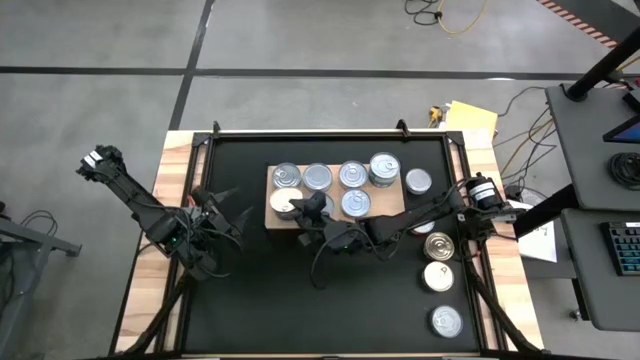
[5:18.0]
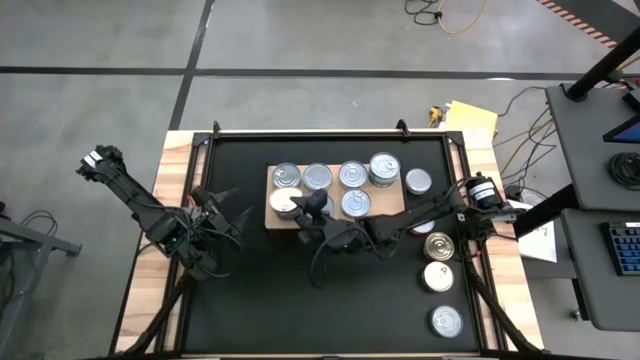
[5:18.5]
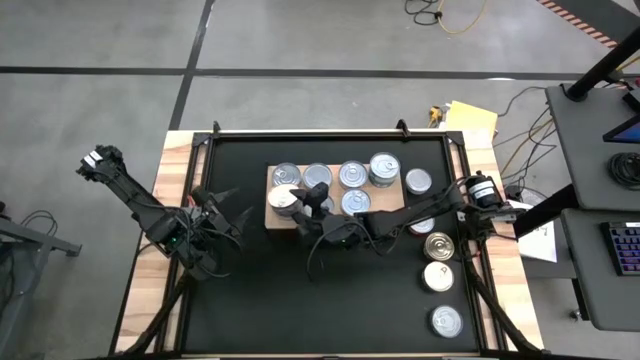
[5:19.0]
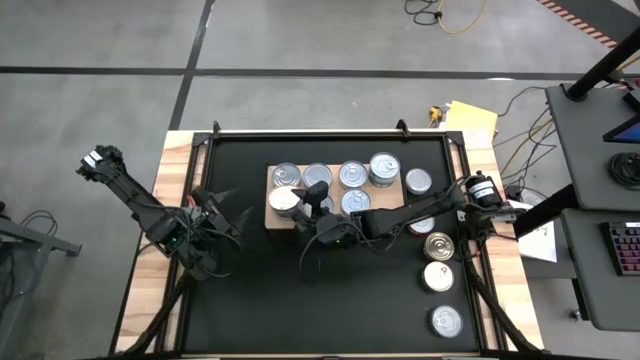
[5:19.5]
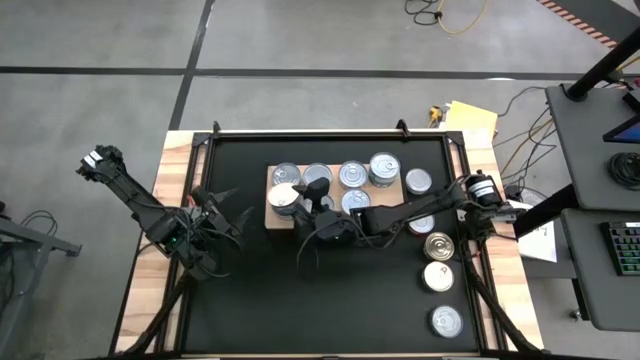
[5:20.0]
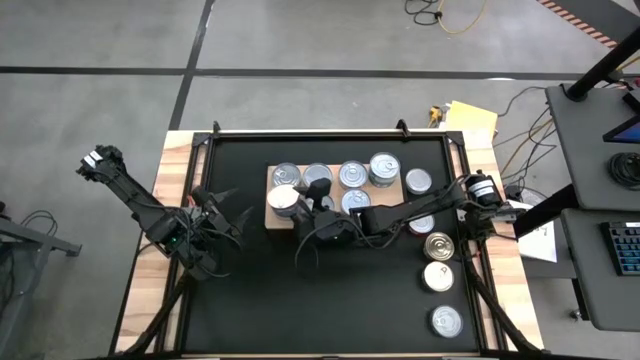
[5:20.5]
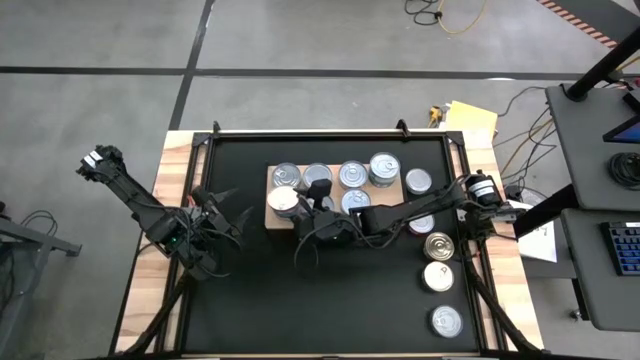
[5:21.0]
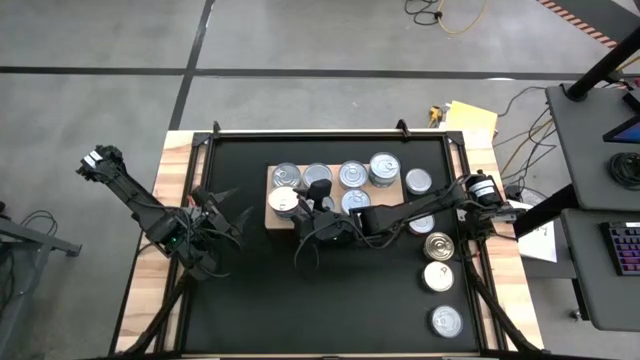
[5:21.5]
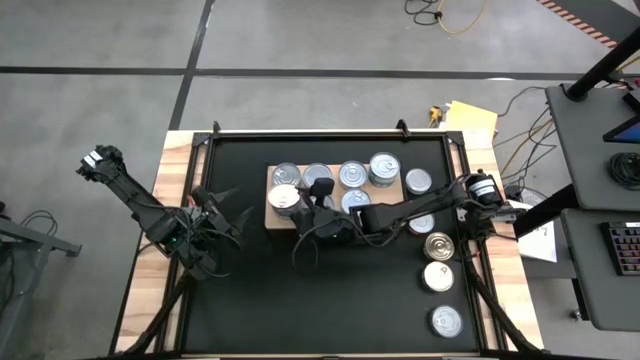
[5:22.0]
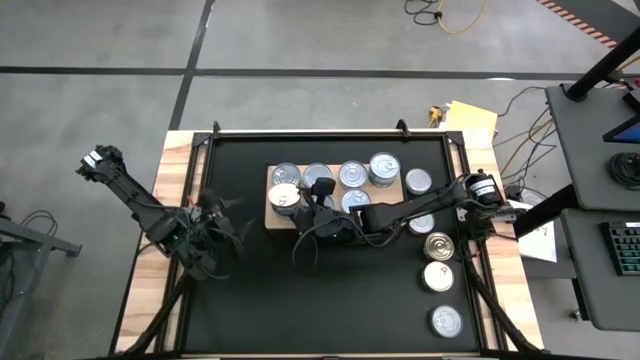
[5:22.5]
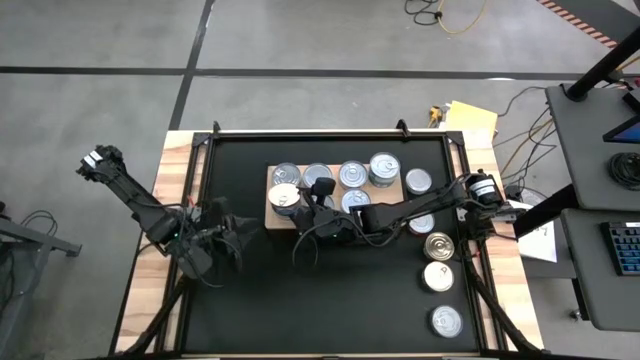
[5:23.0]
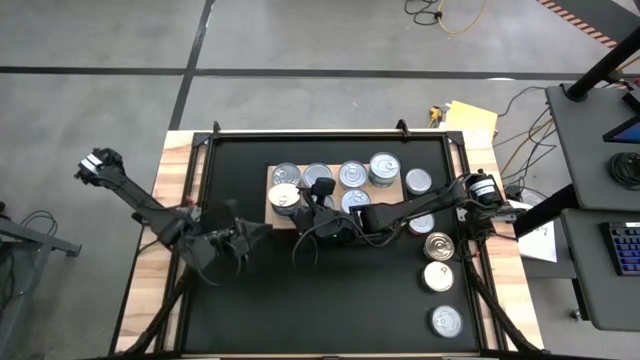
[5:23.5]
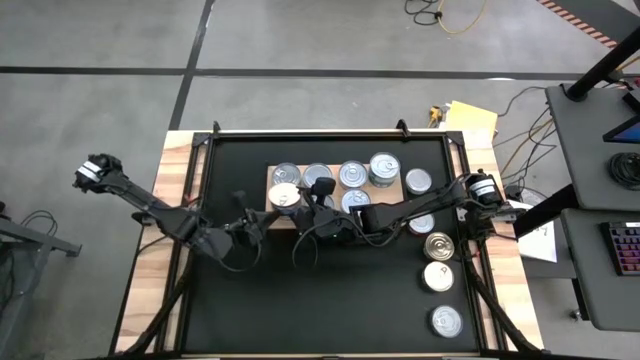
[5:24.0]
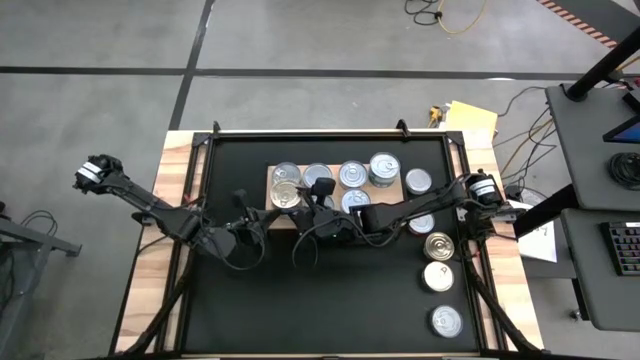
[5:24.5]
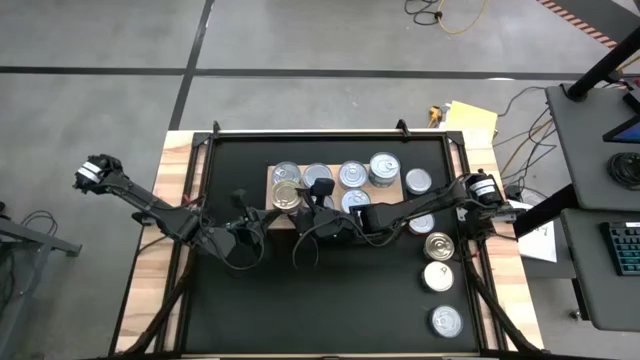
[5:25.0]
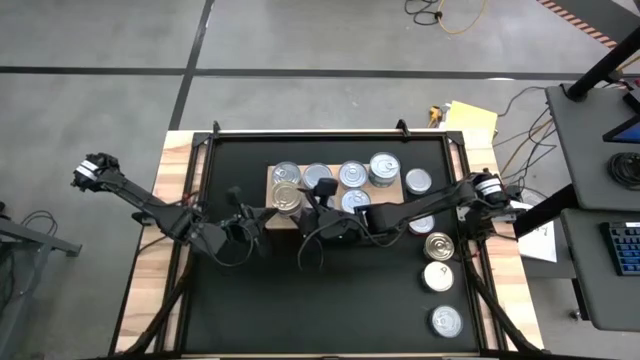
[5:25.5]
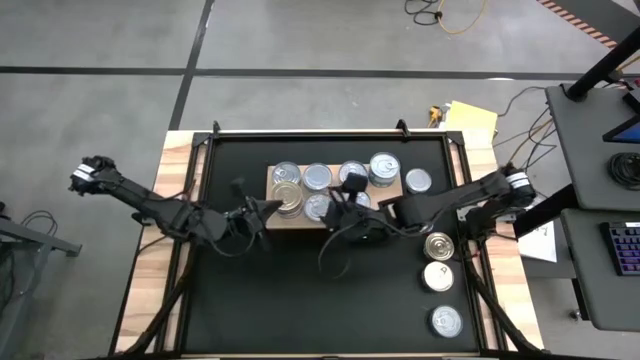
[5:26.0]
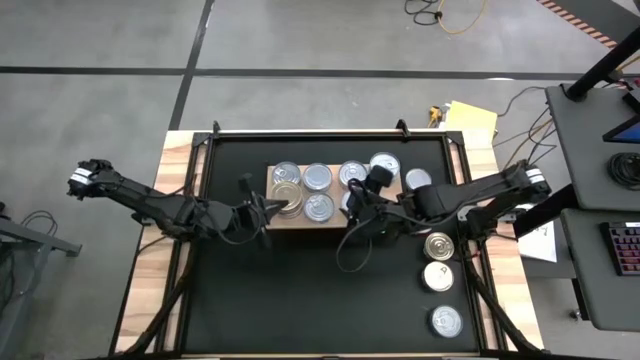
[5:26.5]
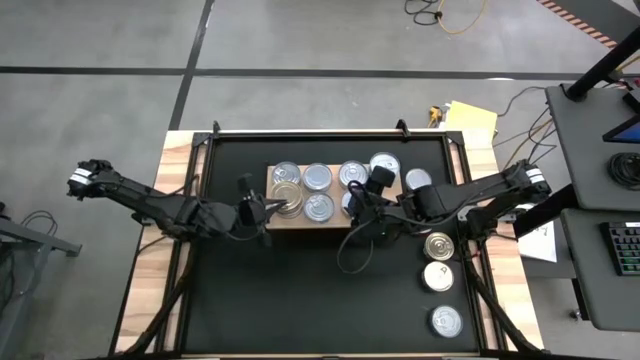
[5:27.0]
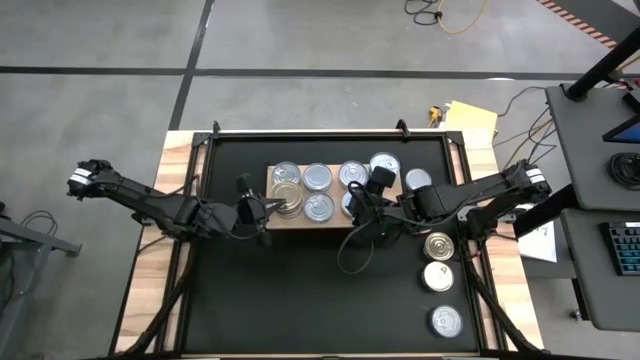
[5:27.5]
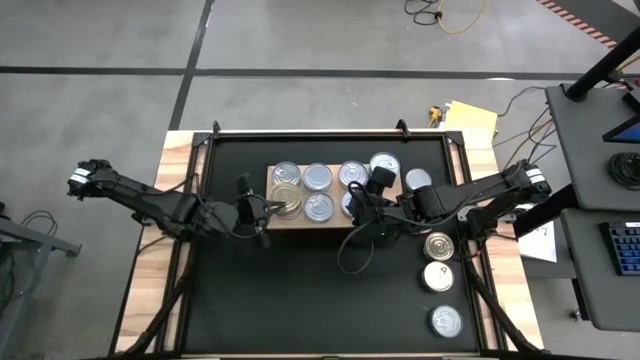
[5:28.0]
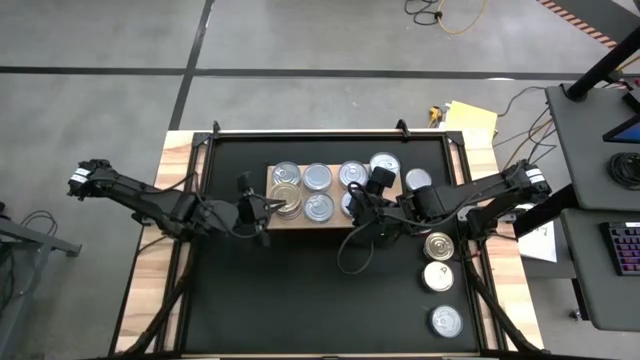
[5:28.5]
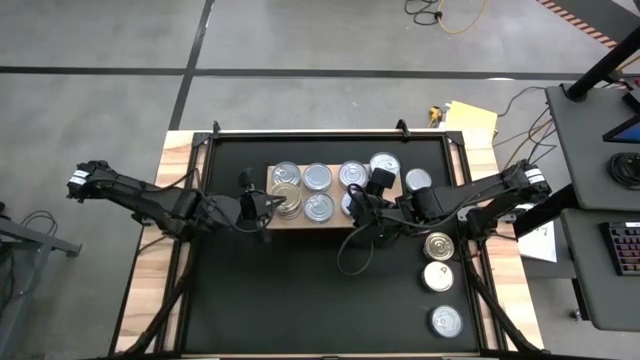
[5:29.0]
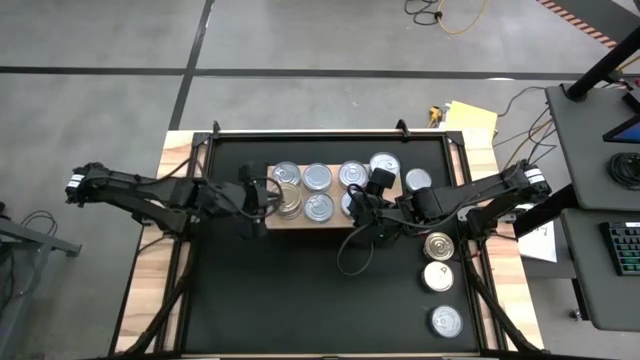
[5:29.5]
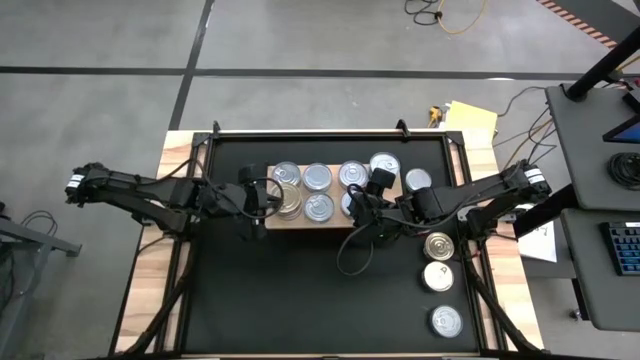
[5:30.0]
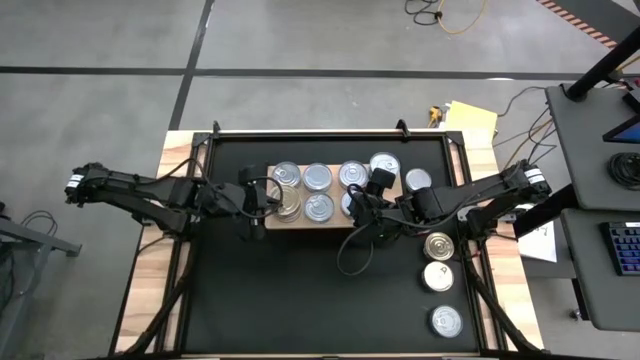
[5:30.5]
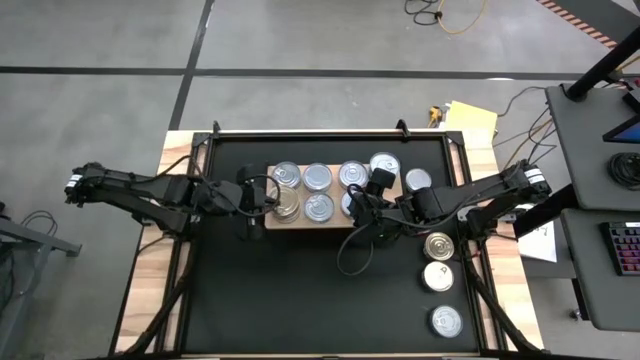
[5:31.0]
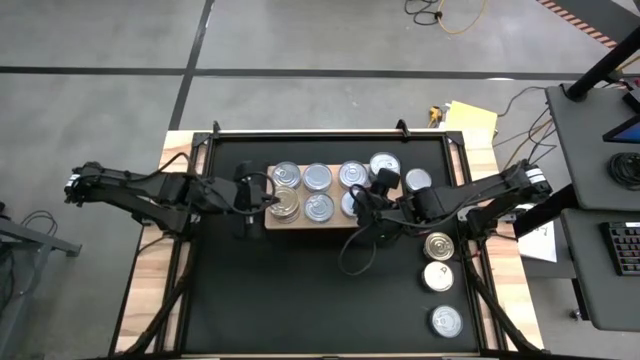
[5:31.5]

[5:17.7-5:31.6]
Task: Stack canned seafood by type on shelf
Stack the blue tuna can on the blue tuna can

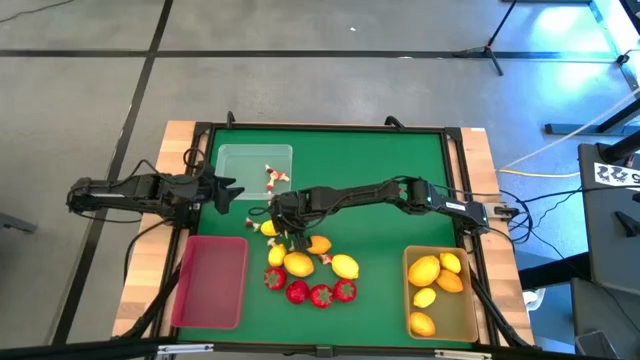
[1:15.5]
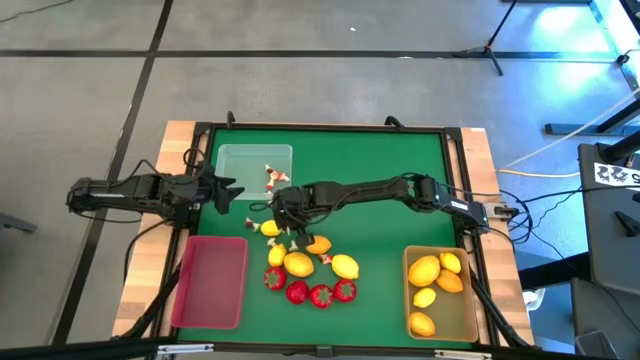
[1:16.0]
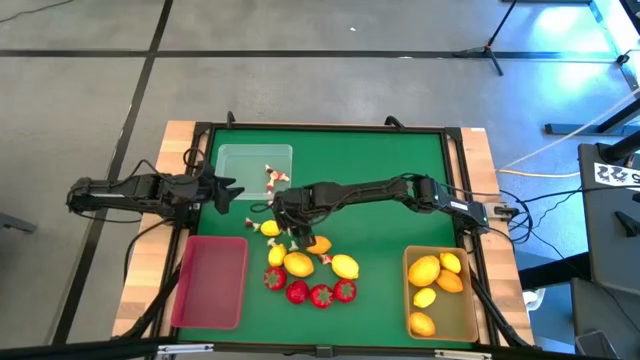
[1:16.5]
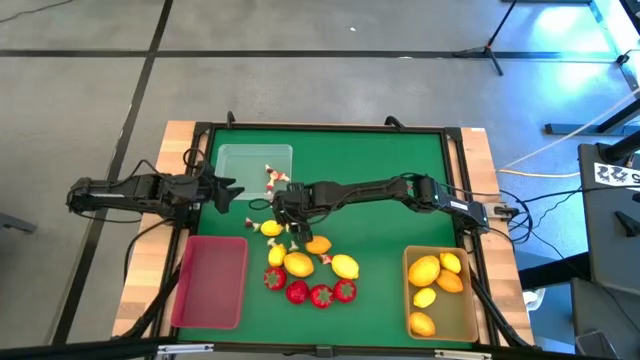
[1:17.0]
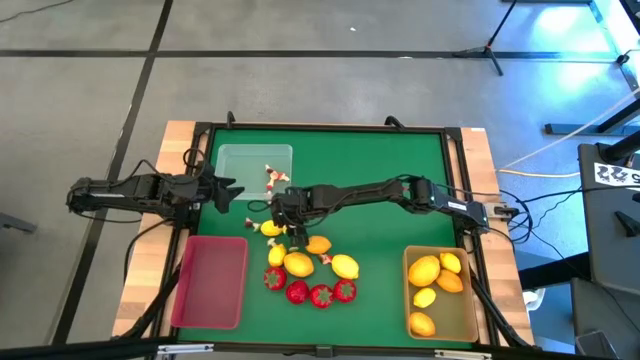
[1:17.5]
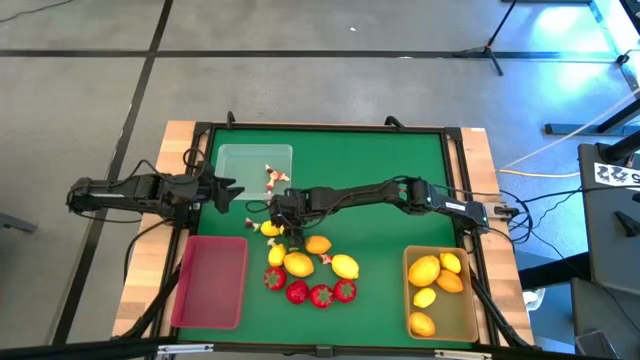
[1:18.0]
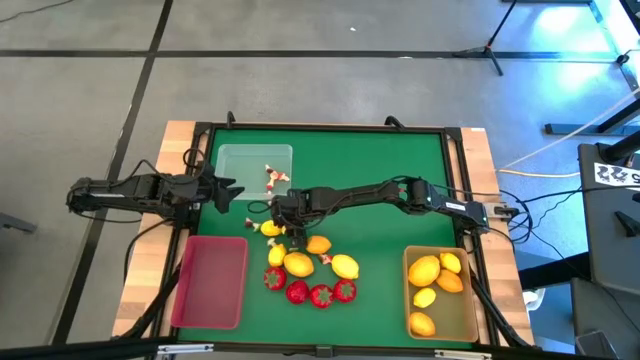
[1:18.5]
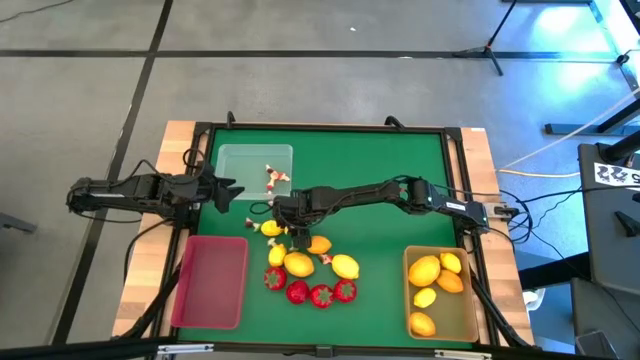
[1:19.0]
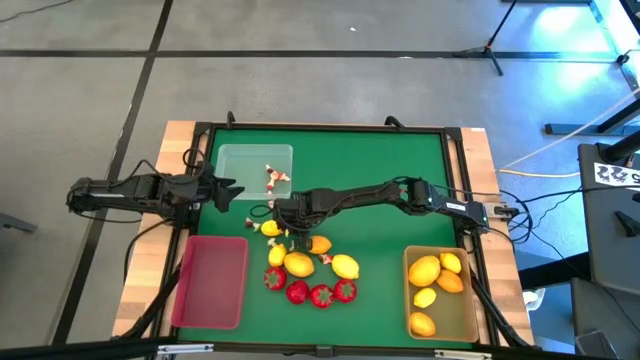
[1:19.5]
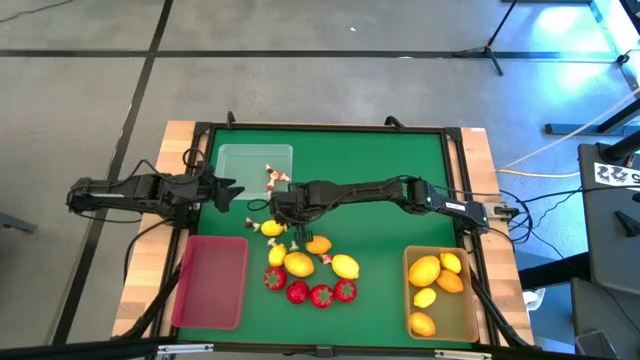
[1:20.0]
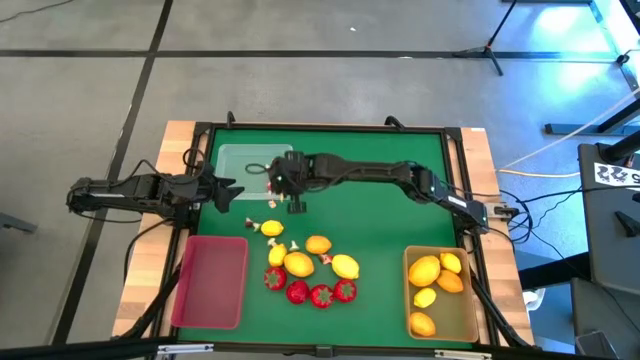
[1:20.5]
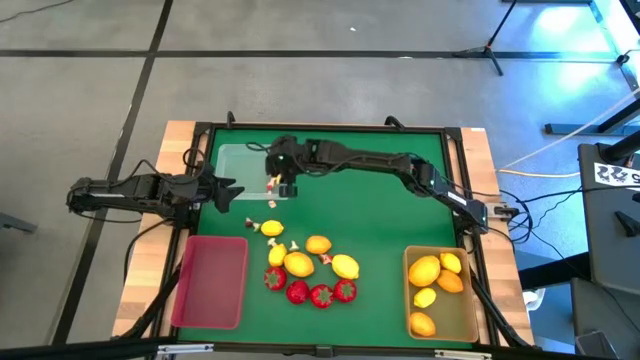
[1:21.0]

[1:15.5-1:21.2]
Task: Sort produce into baskets
Put the red mushroom into the transparent bin
